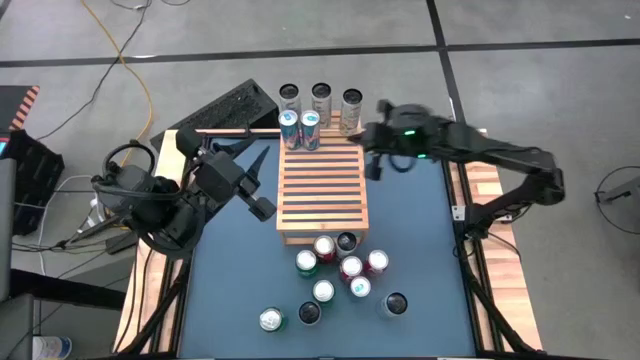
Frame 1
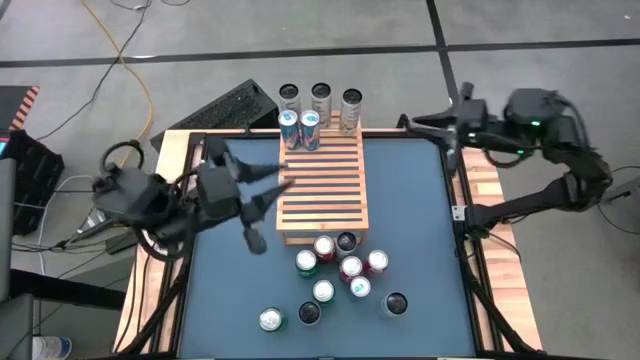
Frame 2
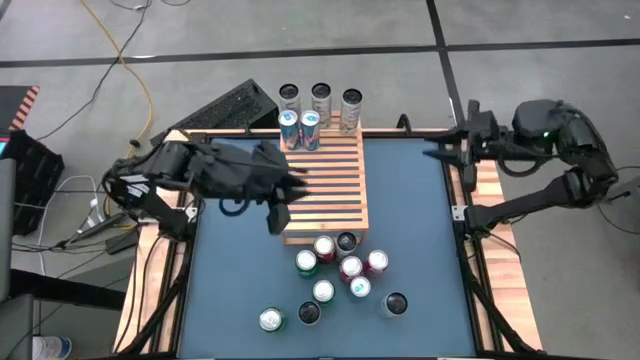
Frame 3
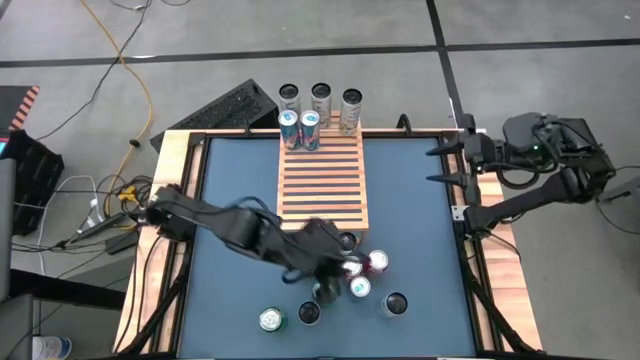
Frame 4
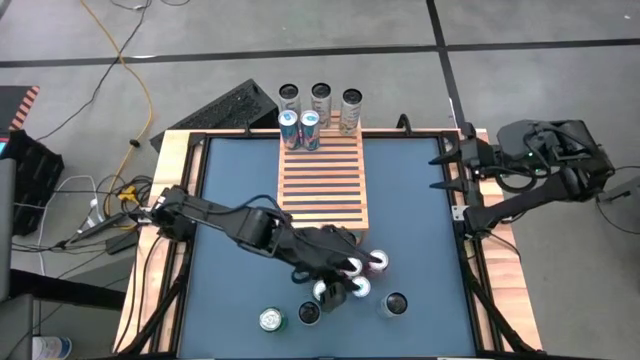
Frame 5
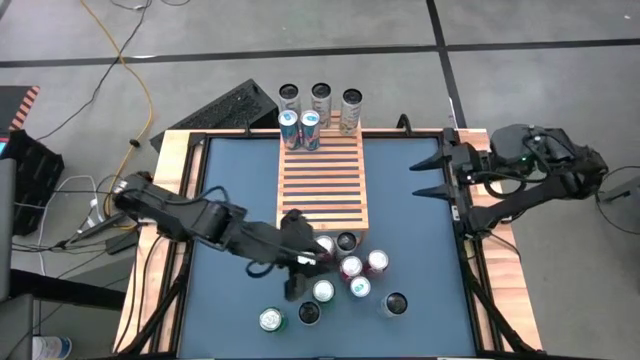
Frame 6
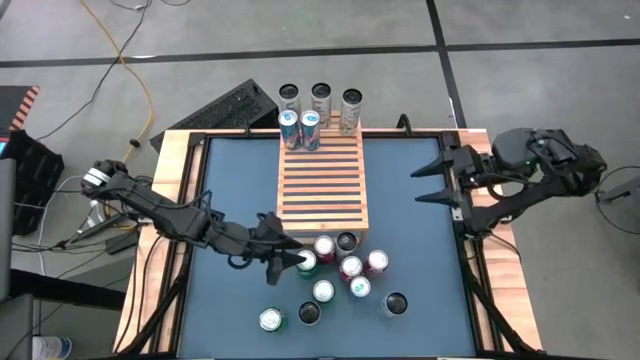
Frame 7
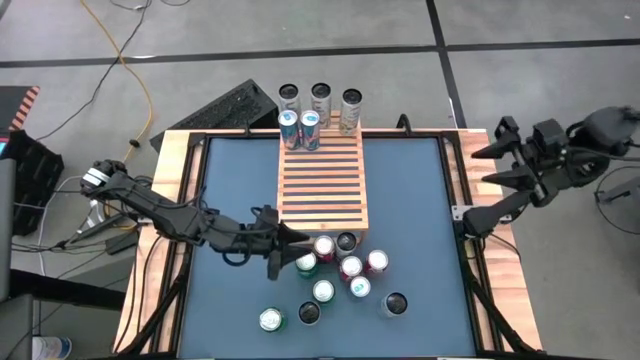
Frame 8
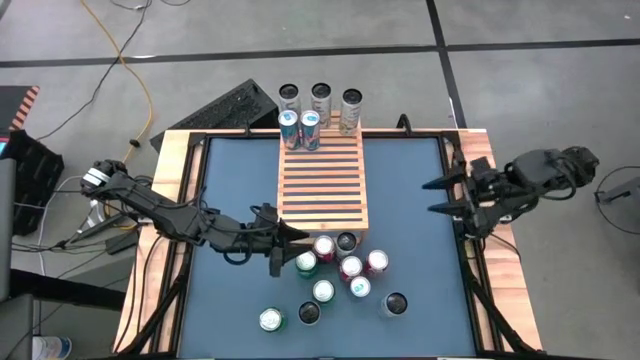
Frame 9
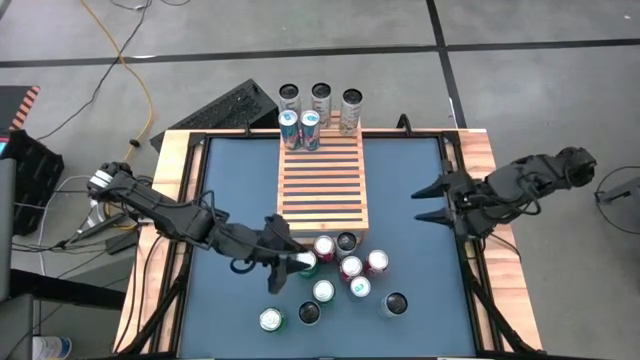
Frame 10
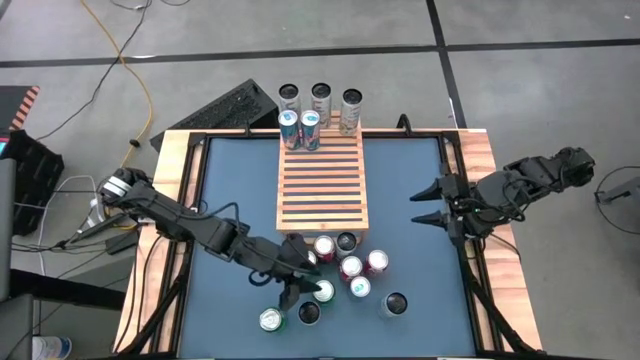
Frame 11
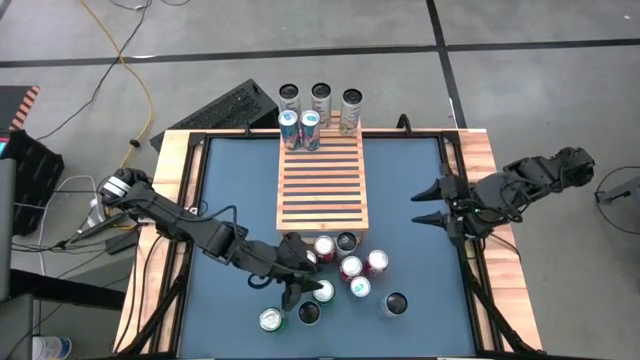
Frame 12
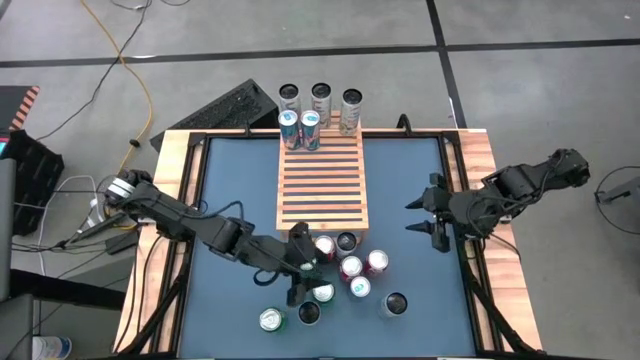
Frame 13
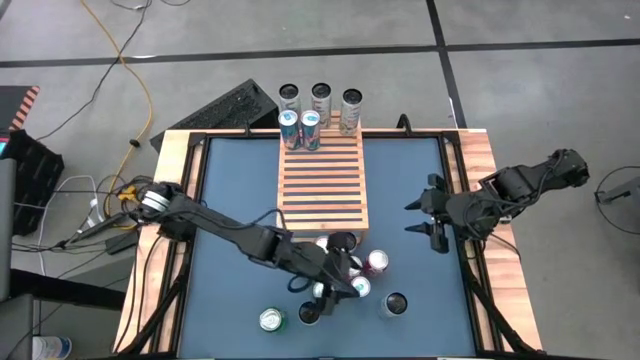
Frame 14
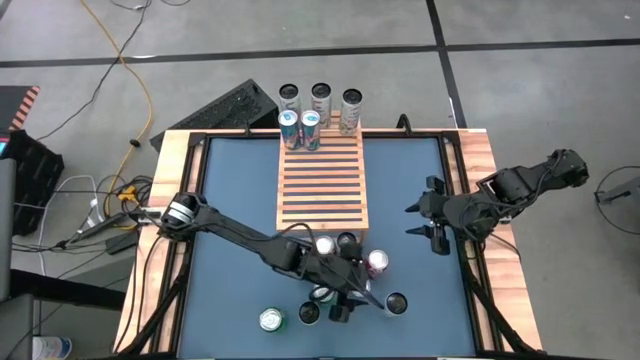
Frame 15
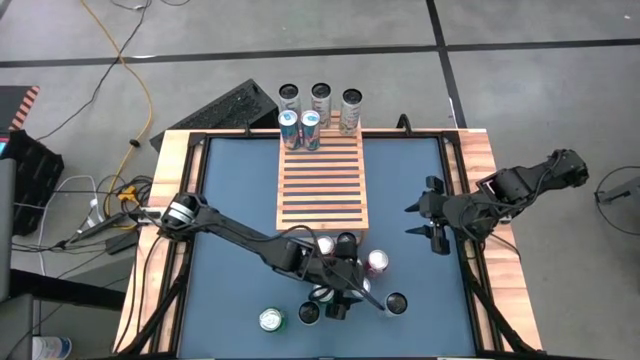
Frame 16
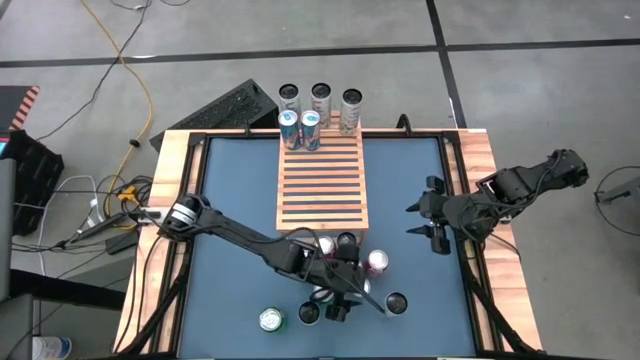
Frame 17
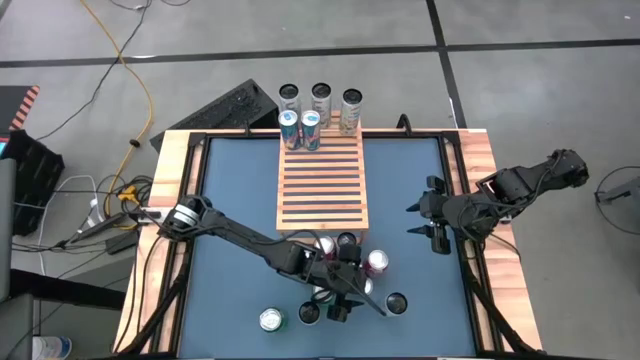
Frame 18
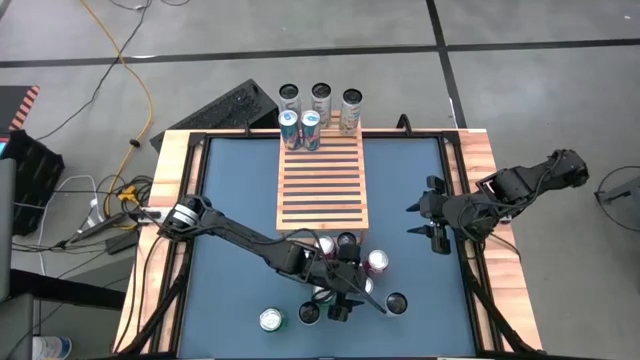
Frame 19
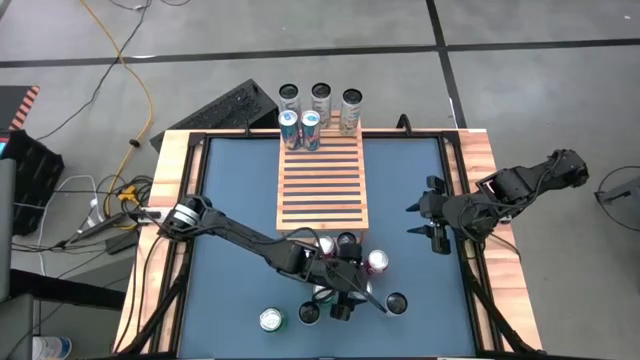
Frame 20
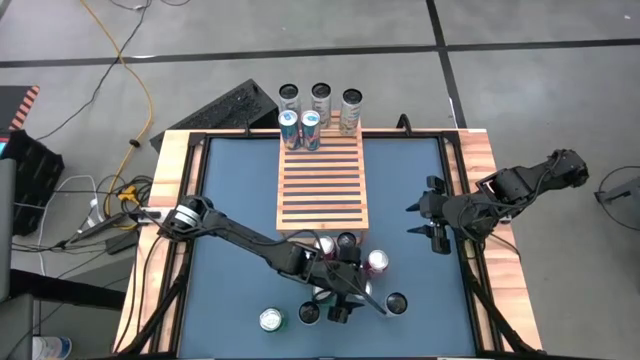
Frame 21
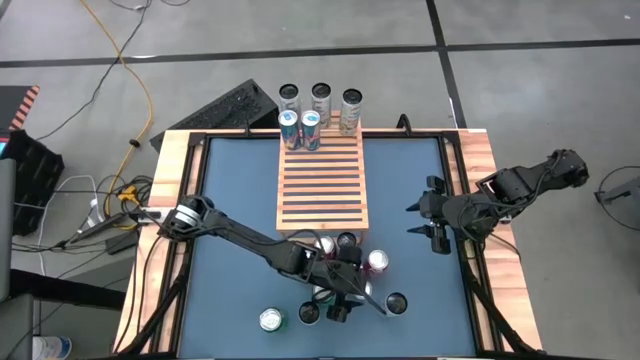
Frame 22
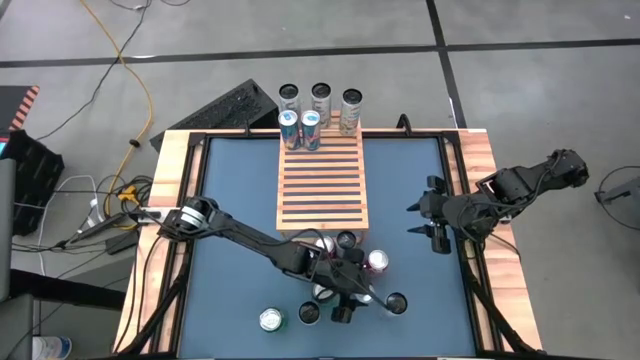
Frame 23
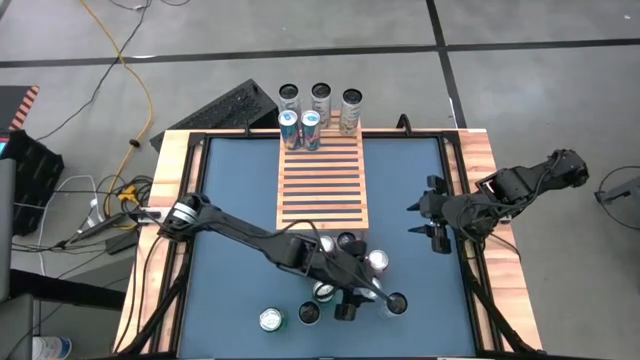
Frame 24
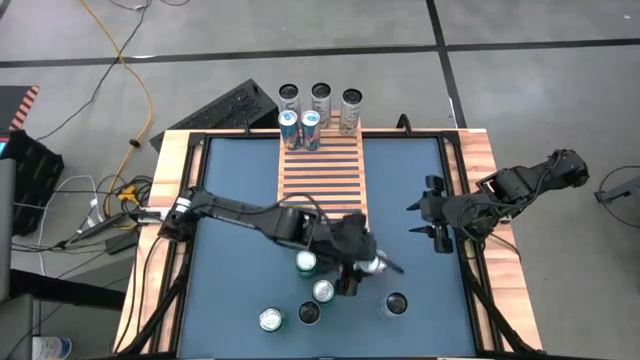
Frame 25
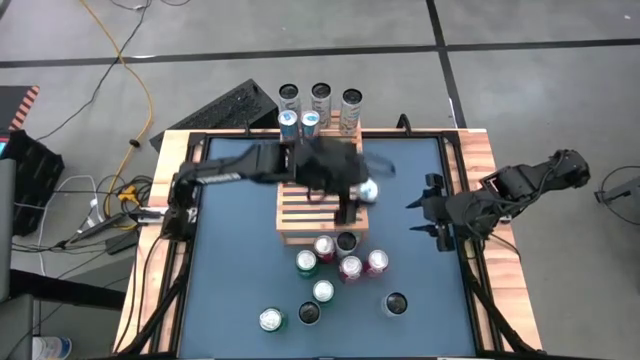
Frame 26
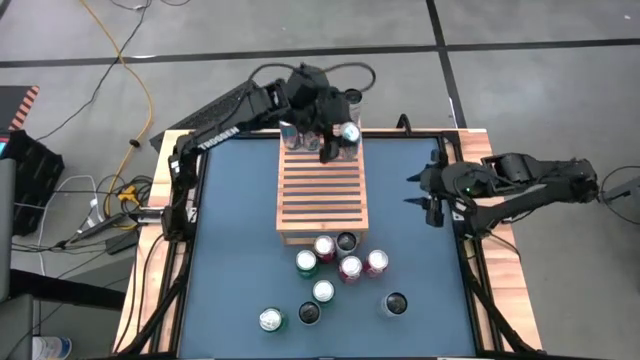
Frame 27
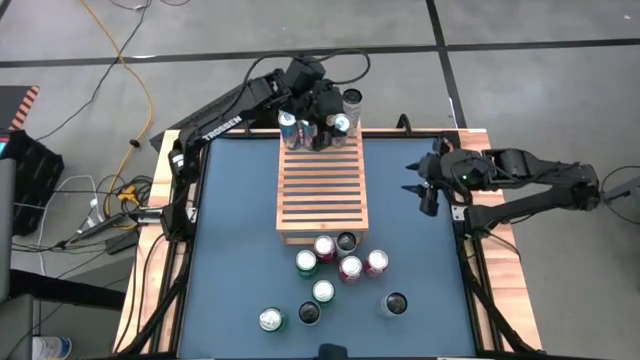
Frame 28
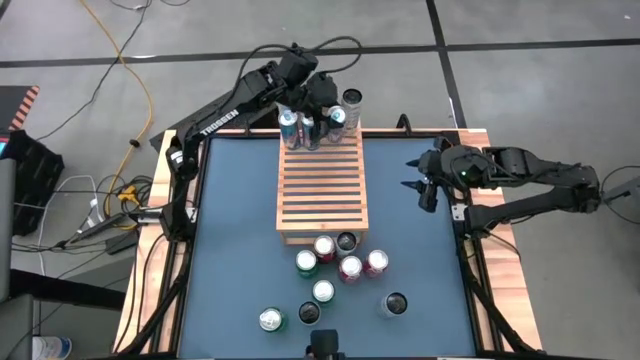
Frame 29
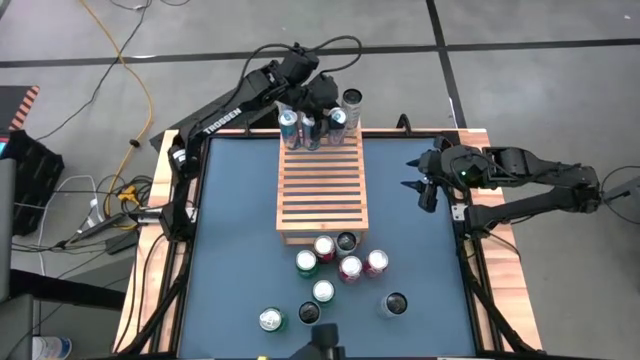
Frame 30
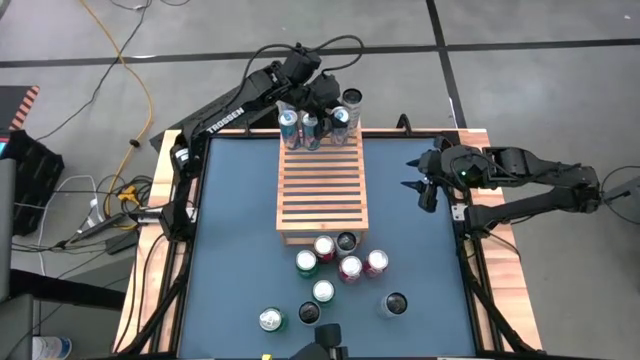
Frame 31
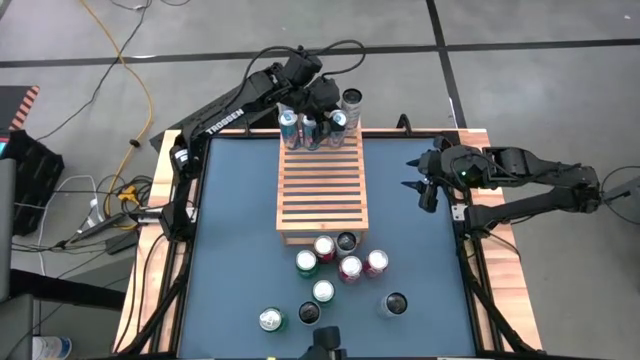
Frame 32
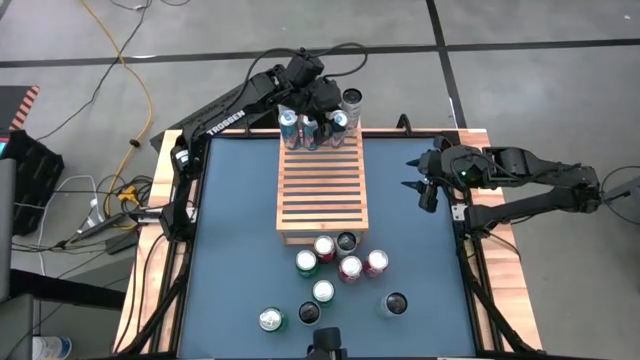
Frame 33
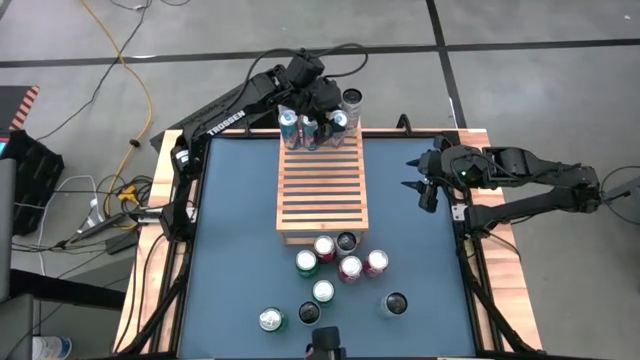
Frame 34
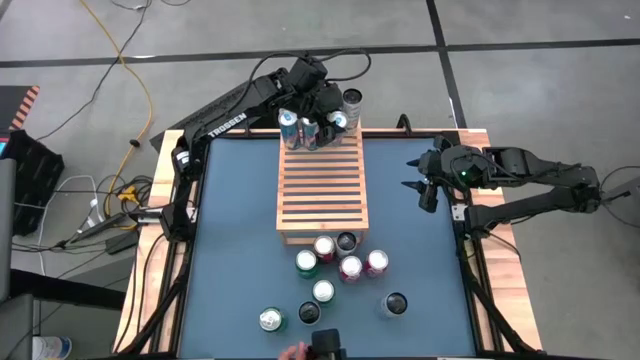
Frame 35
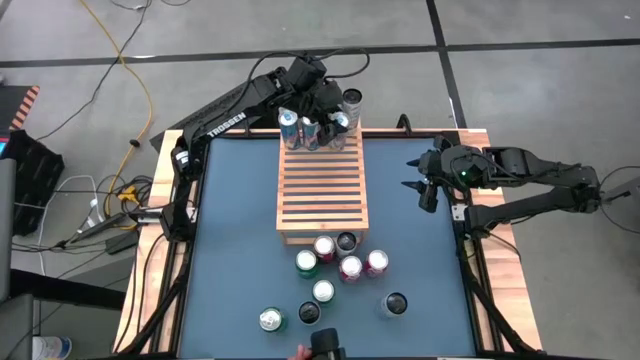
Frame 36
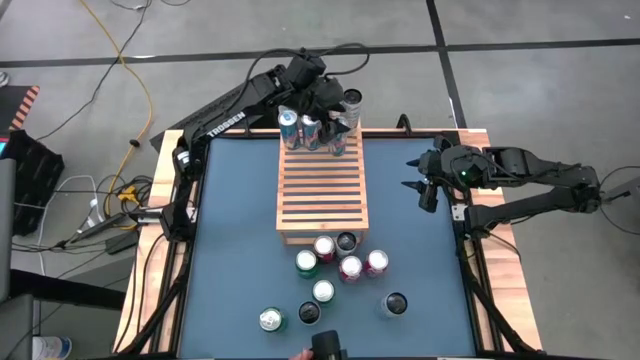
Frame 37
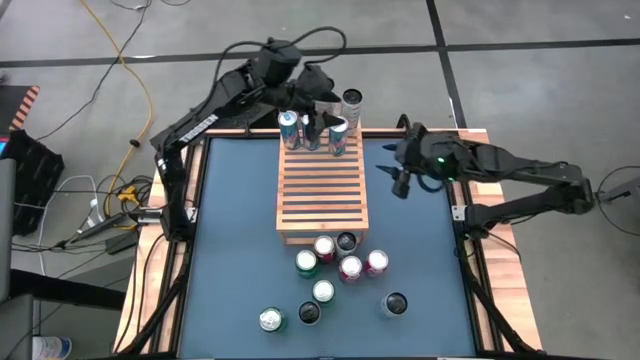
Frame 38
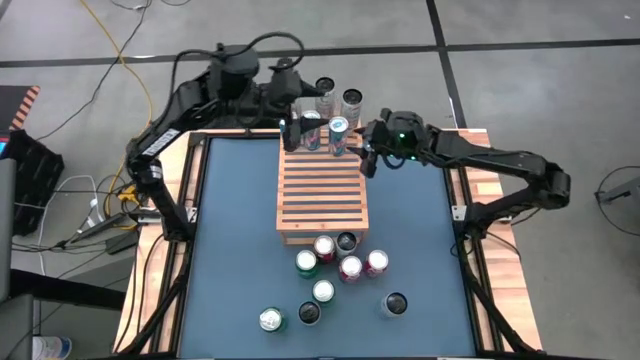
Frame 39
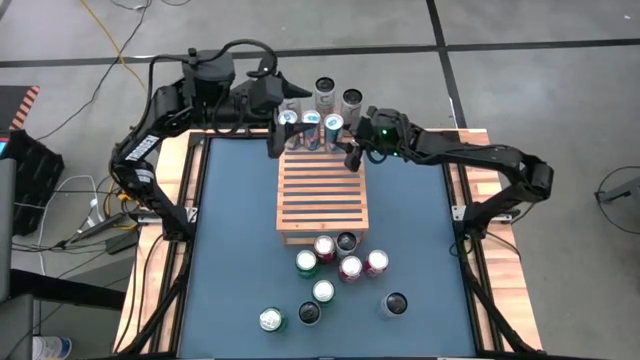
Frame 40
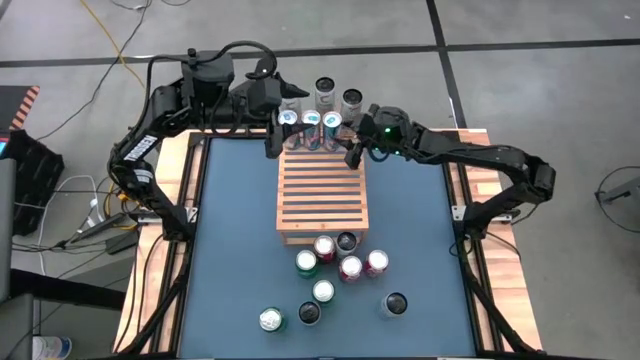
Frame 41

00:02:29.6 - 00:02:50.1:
Task: Place canned beverage on shelf
Put the blue soda can on the shelf aligned with the other blue soda can
